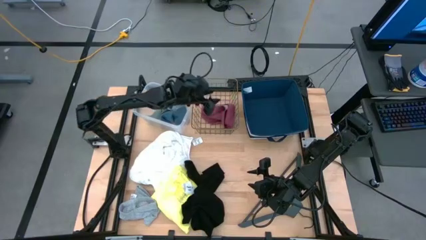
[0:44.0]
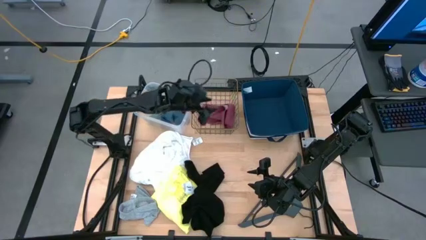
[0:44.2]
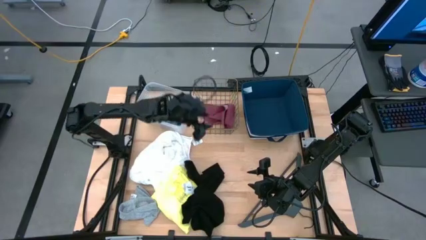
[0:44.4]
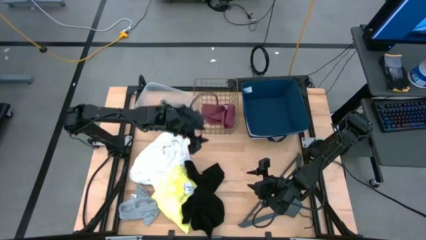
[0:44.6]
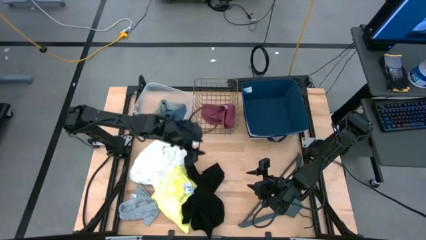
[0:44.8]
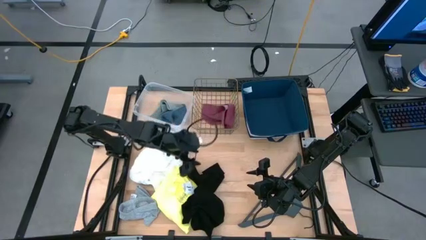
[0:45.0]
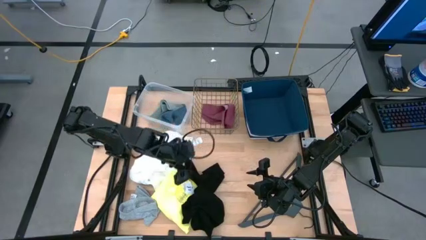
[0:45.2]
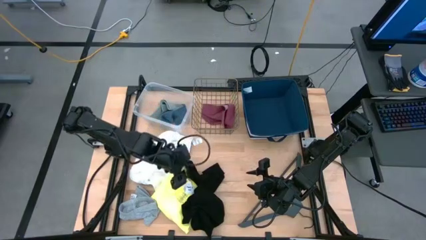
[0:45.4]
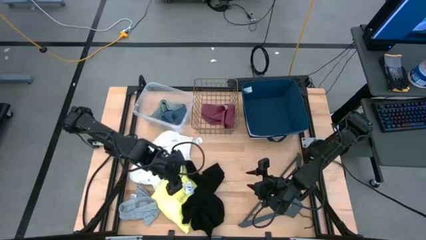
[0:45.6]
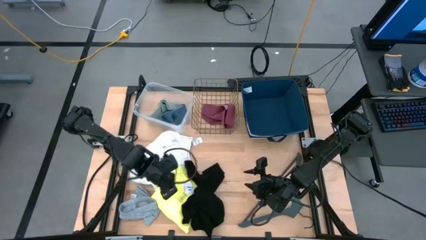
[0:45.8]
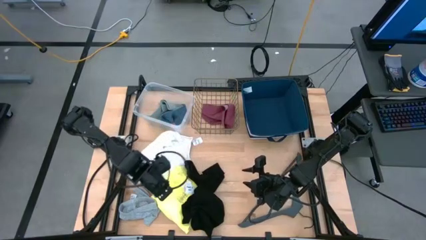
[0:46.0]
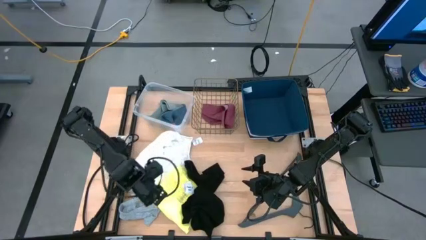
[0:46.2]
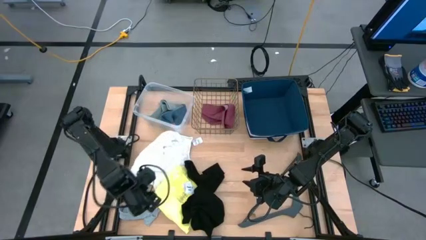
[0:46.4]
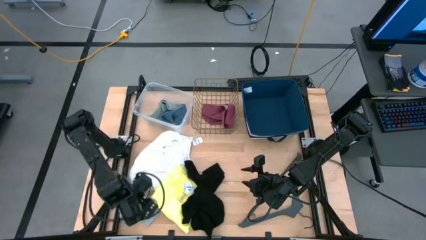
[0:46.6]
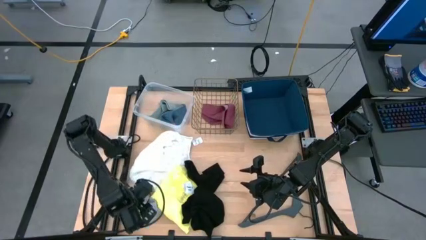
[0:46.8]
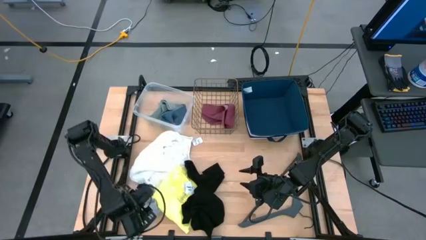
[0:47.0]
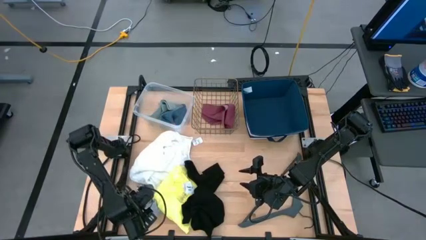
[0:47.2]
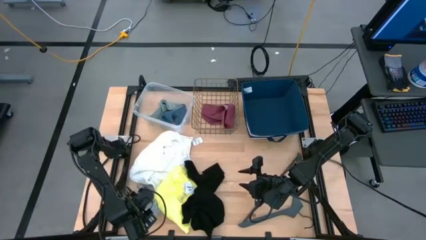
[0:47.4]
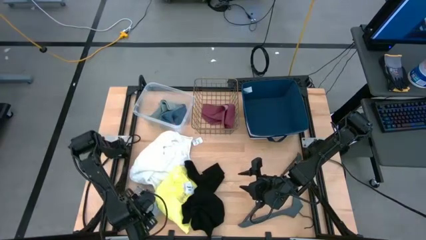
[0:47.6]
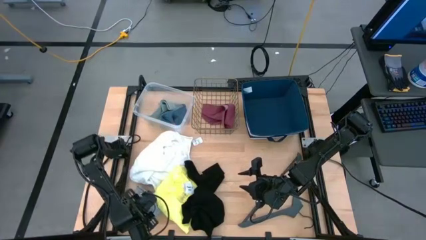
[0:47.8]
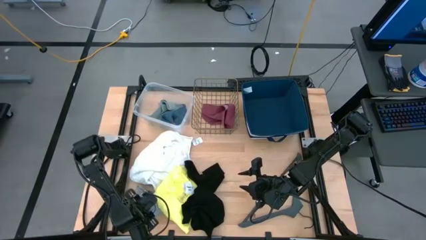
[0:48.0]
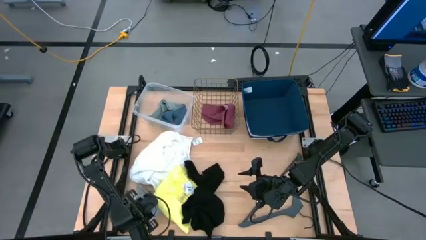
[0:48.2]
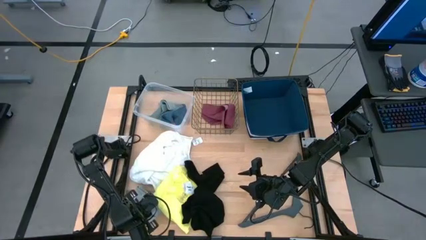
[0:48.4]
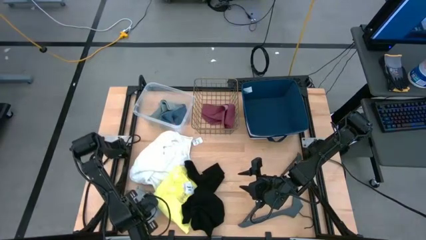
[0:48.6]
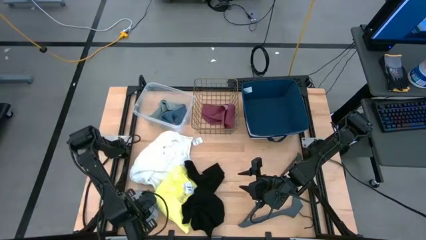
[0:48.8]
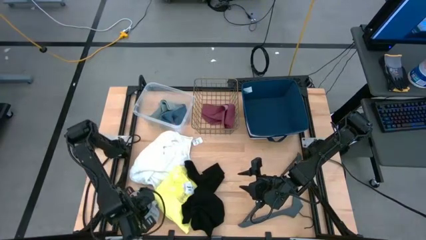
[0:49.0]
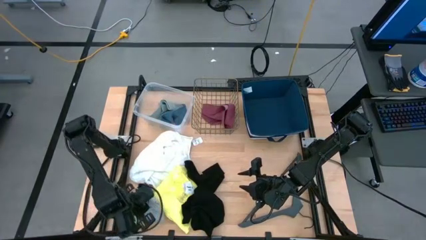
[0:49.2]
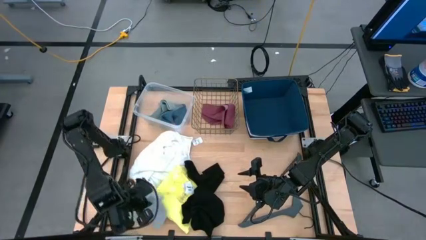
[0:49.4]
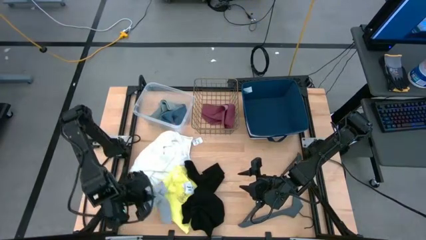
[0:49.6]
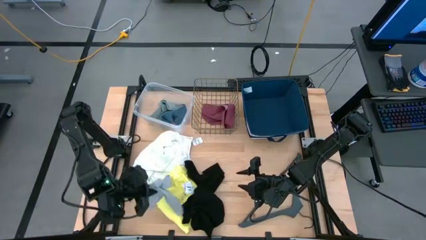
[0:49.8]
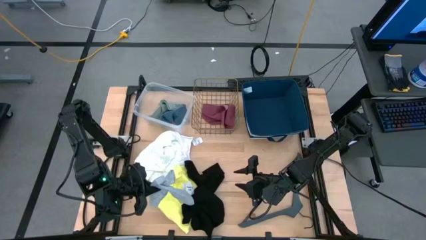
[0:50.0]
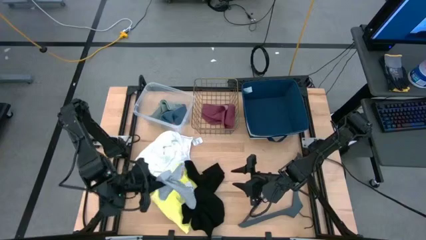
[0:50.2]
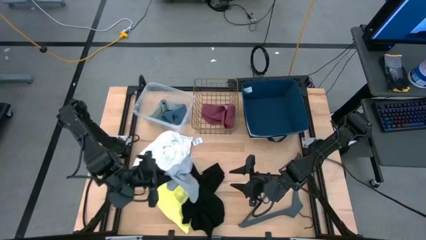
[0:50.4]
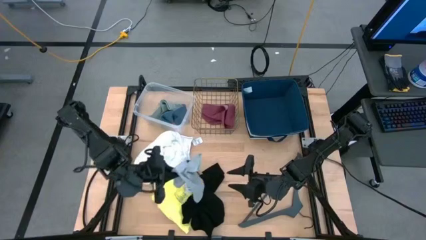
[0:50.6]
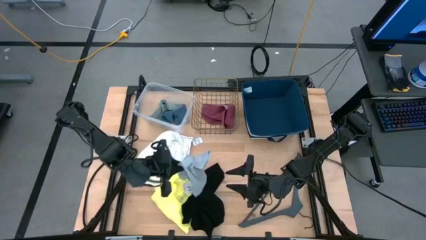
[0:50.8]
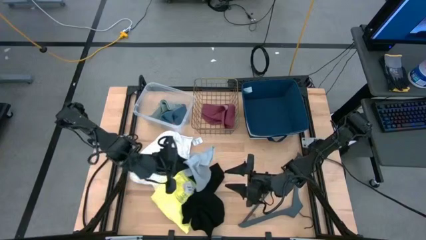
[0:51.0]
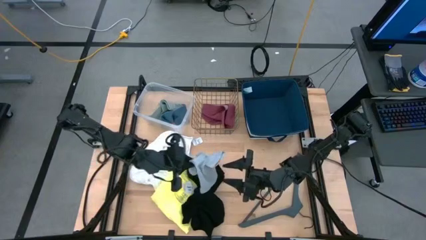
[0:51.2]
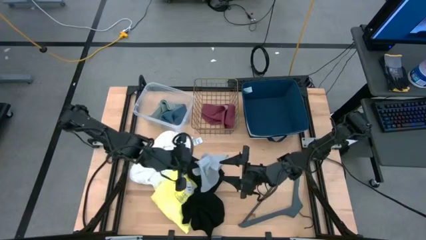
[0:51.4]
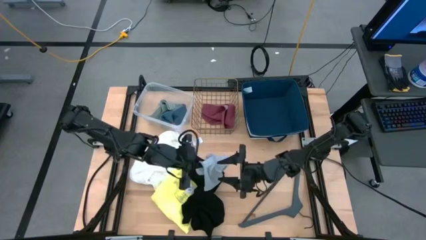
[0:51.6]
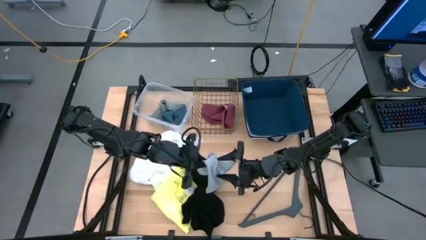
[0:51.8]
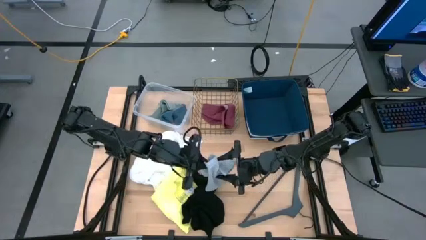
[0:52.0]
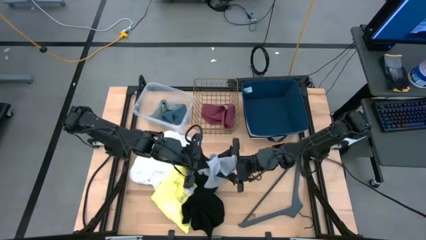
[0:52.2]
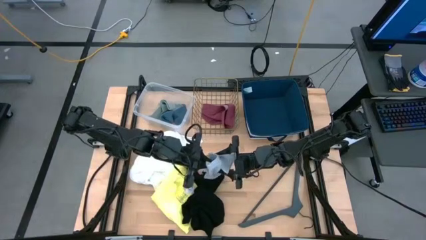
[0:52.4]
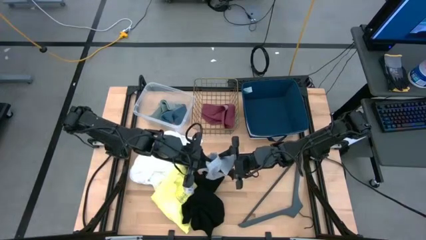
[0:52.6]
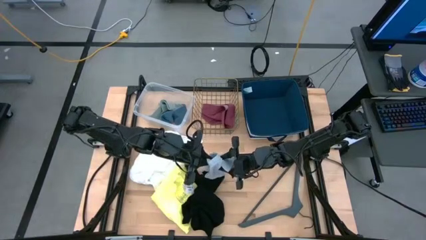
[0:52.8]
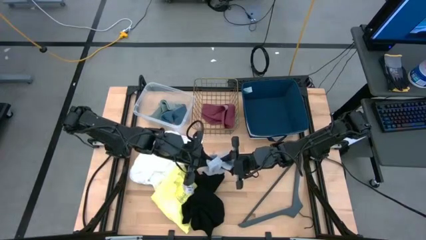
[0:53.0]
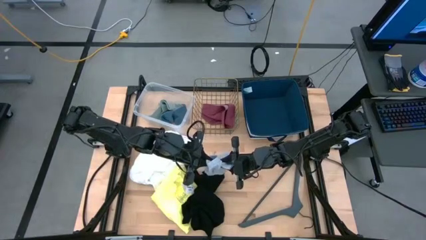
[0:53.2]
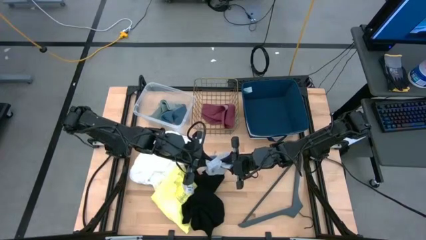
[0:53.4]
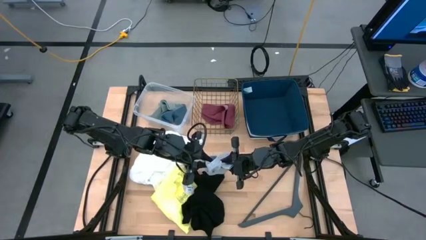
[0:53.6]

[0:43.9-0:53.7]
Task: Pick & Place Cloths
Put the gray underwear into the mesh basket

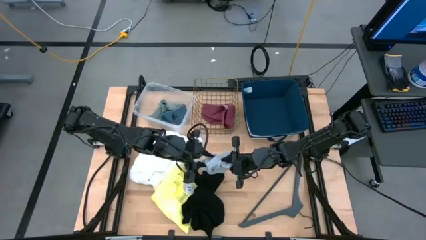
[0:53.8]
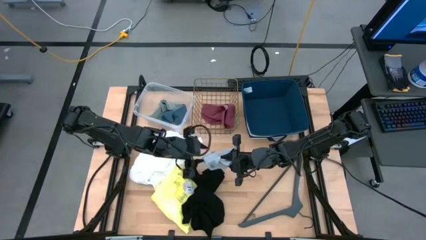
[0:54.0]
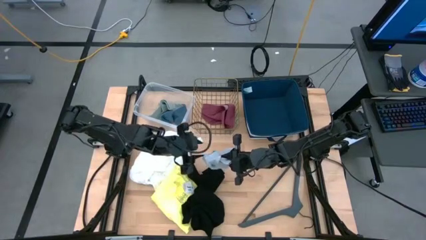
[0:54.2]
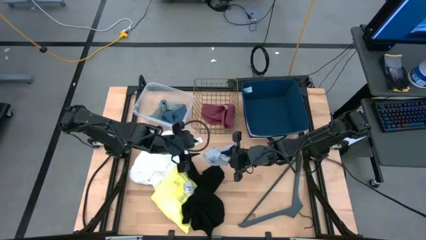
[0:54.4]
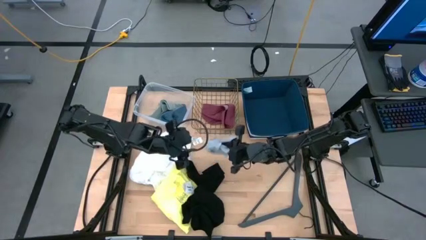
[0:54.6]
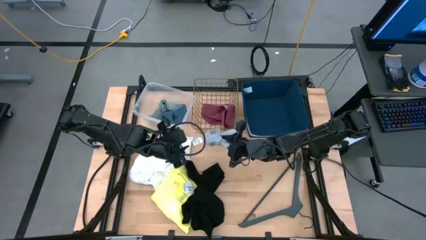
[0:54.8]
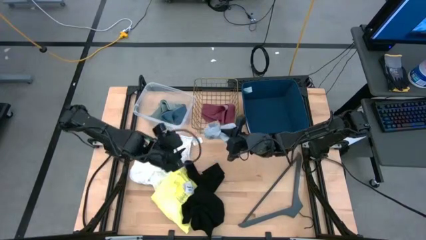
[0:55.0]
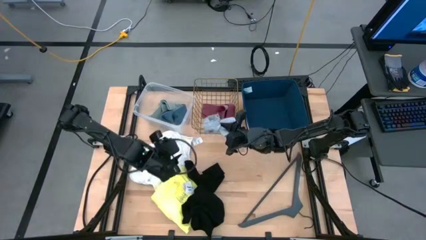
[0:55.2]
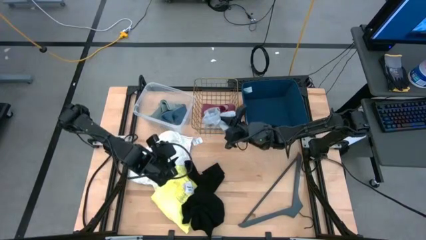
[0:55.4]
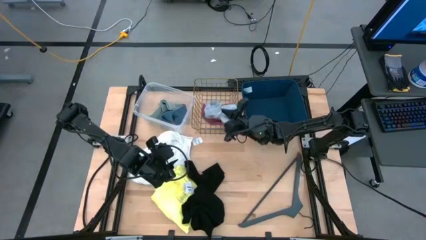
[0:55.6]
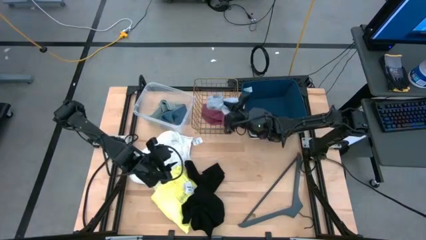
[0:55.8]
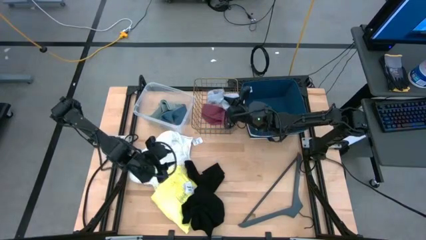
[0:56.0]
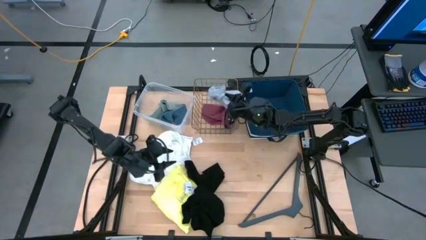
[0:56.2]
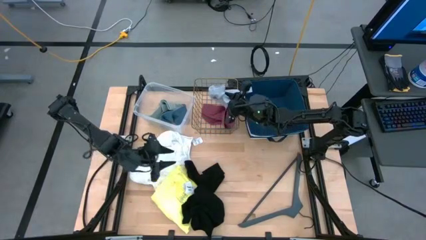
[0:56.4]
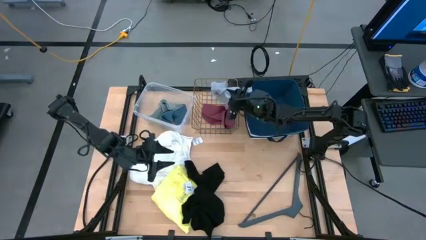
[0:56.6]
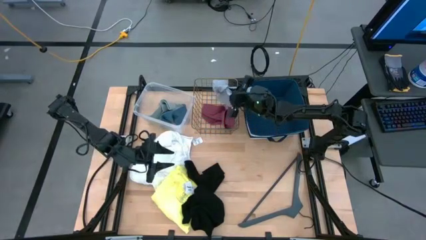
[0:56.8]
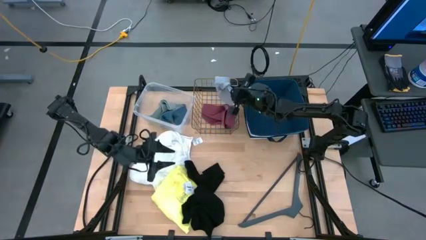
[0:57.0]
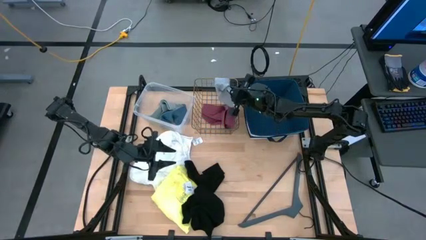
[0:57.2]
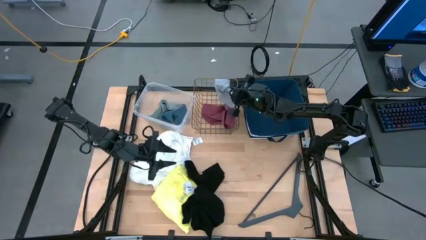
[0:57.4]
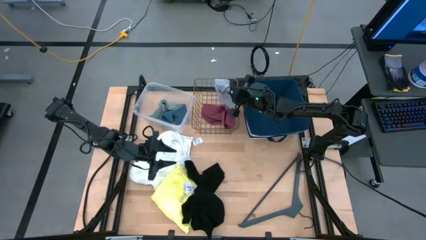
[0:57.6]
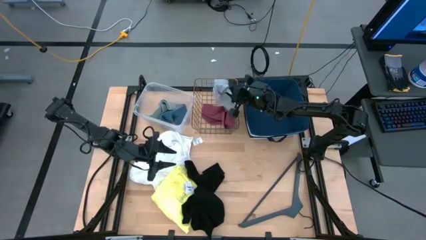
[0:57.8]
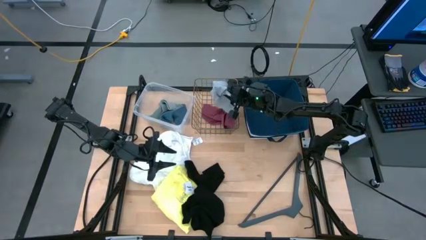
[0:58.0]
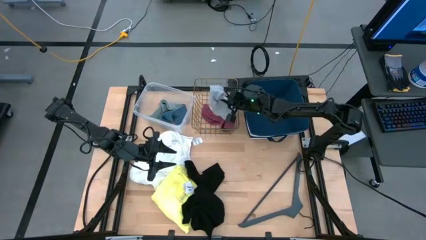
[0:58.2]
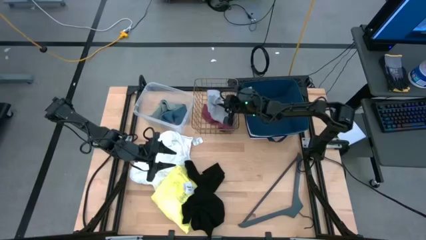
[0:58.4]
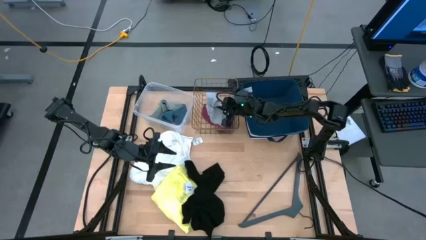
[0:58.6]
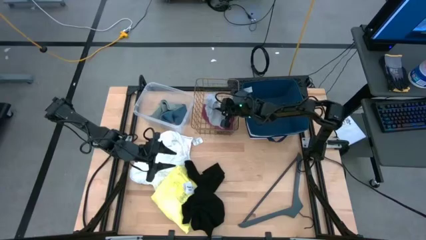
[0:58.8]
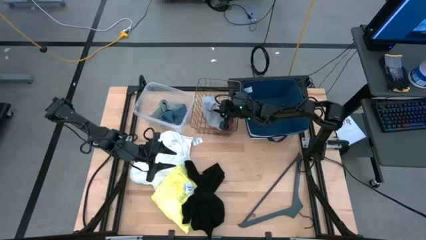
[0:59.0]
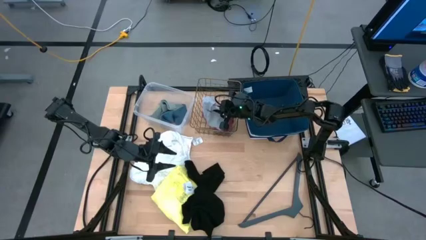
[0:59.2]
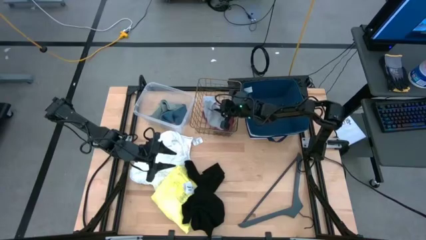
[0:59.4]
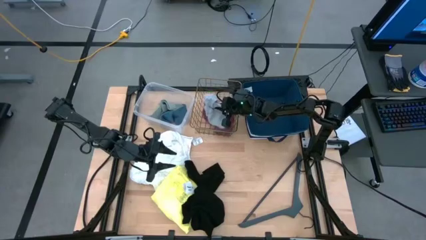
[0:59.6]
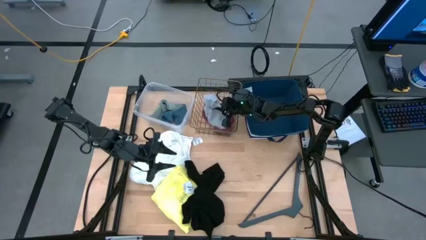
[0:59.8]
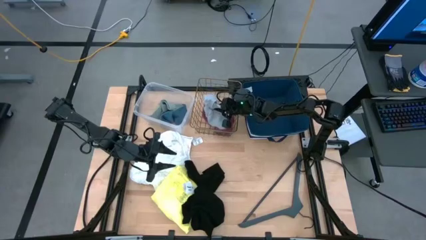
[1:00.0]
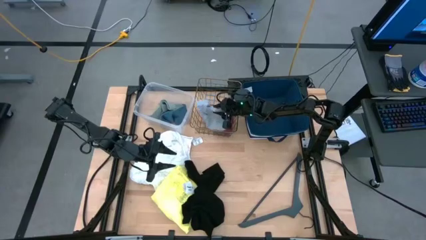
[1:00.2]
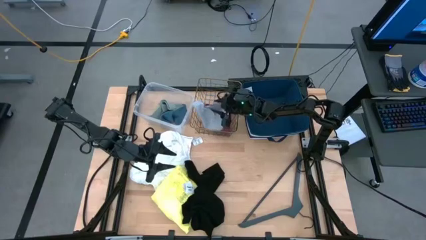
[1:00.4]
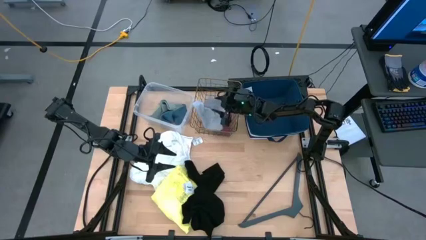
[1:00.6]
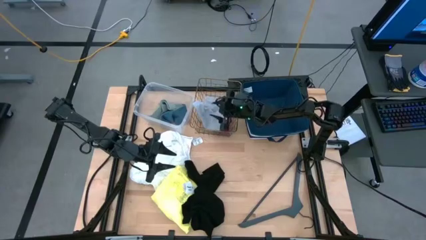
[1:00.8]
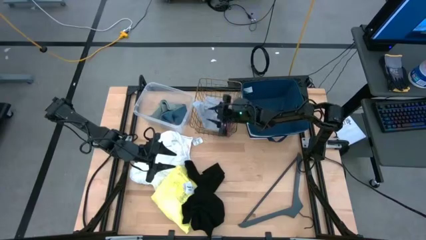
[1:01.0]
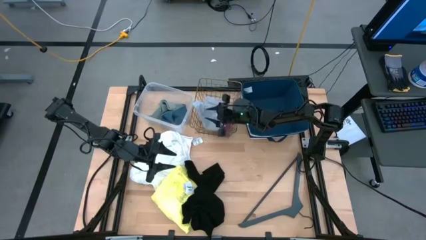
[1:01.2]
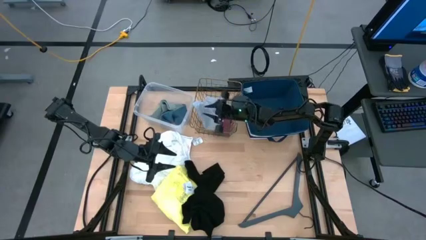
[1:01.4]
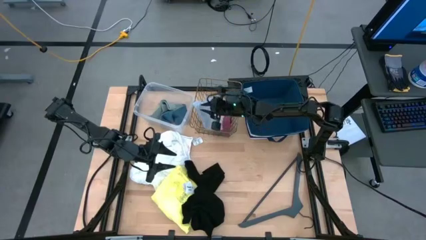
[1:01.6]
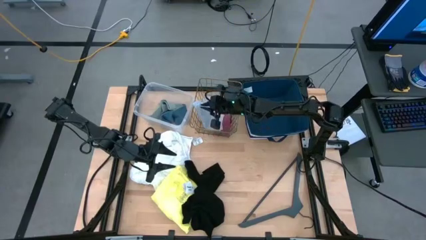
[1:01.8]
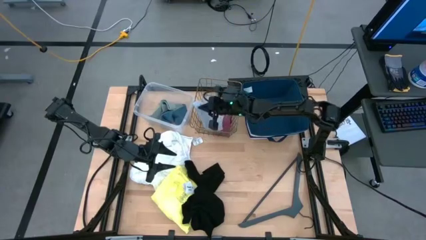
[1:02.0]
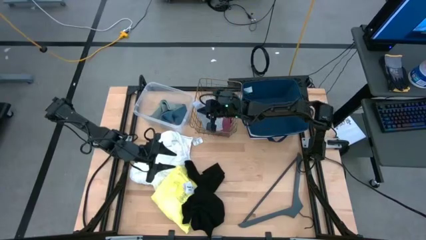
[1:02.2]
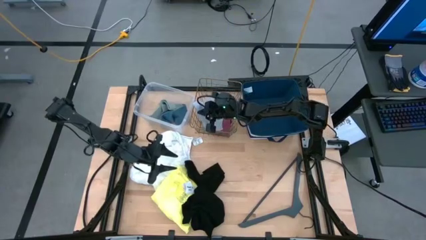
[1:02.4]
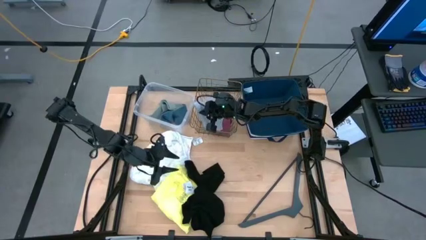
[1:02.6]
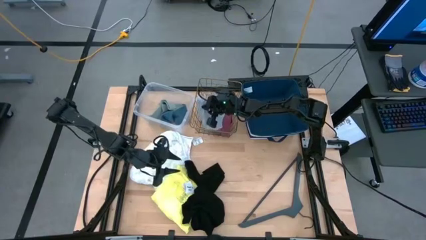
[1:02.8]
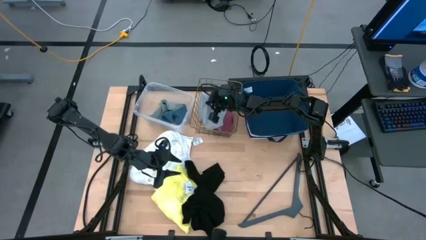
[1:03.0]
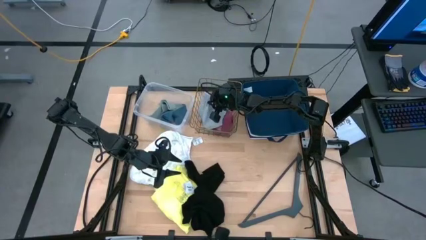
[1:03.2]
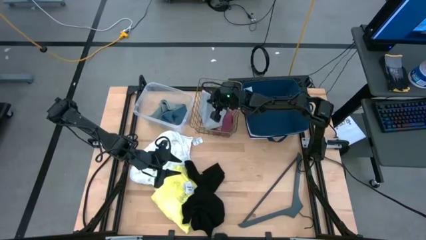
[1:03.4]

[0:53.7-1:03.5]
Put the gray underwear into the mesh basket
